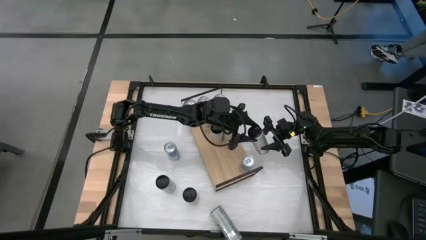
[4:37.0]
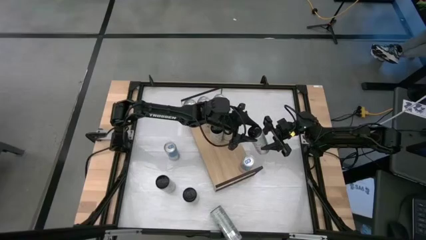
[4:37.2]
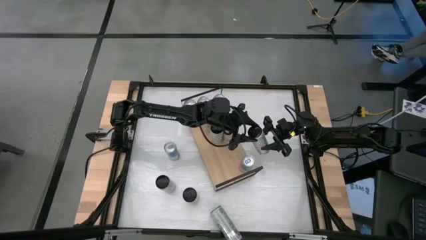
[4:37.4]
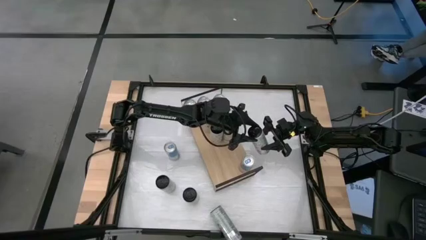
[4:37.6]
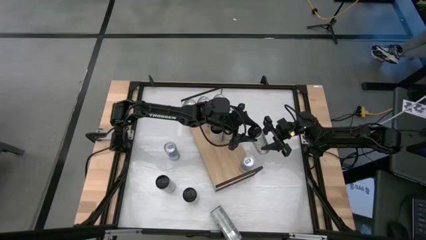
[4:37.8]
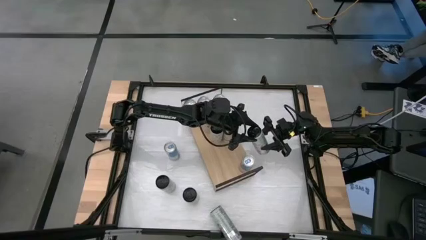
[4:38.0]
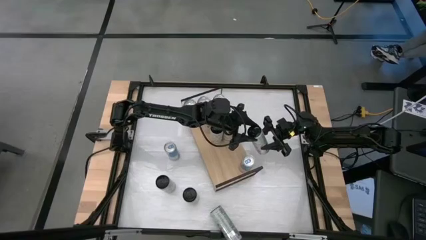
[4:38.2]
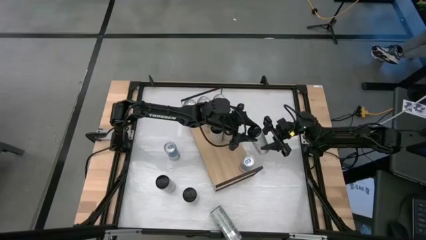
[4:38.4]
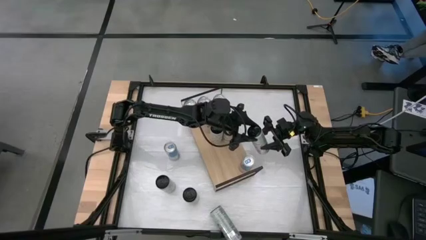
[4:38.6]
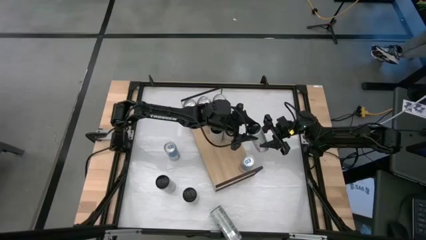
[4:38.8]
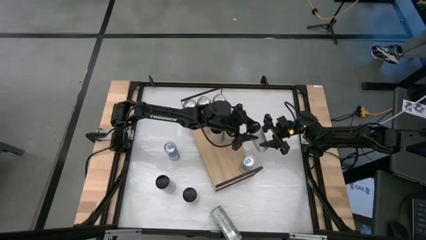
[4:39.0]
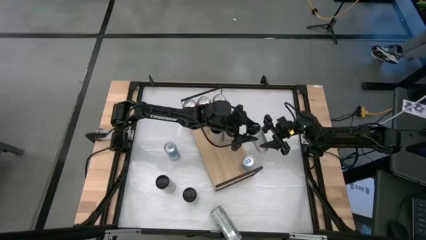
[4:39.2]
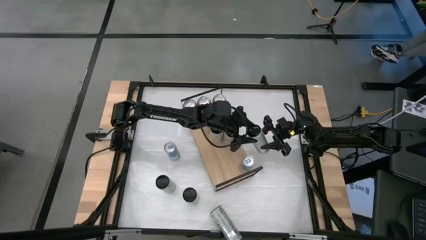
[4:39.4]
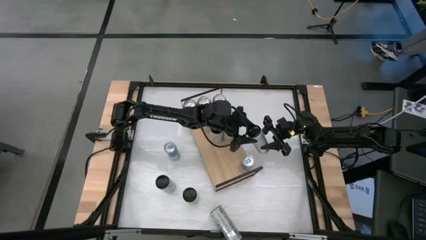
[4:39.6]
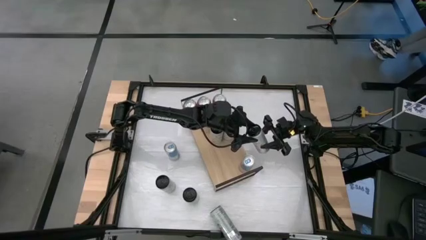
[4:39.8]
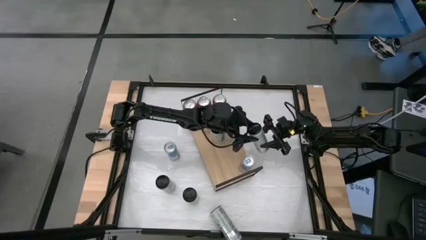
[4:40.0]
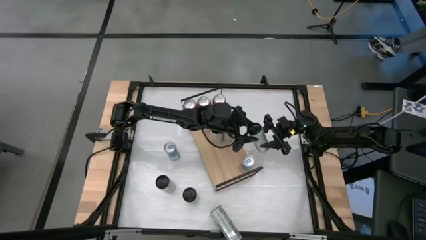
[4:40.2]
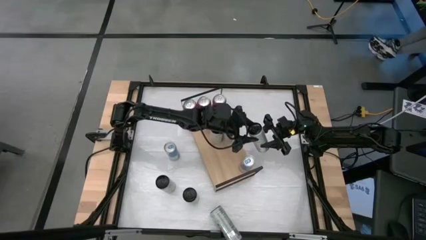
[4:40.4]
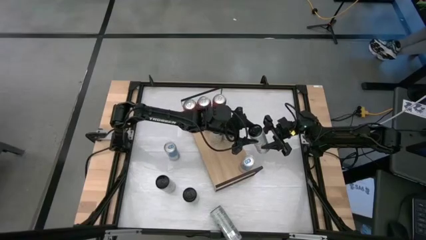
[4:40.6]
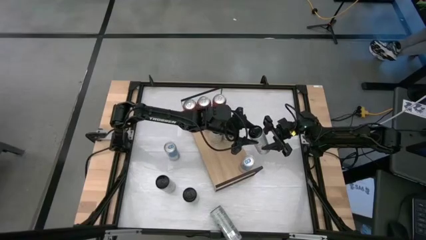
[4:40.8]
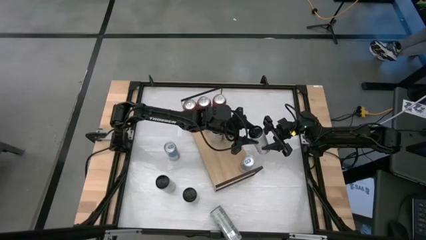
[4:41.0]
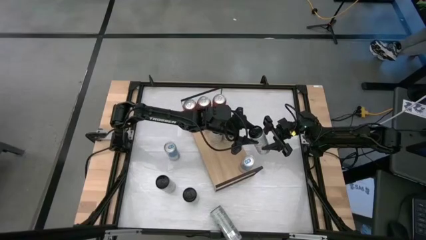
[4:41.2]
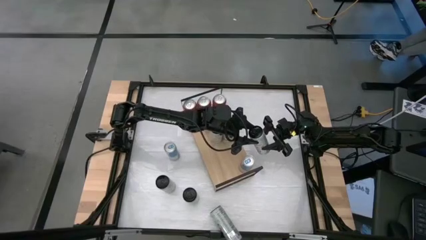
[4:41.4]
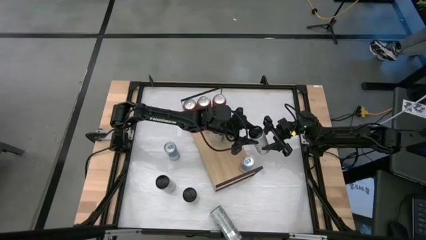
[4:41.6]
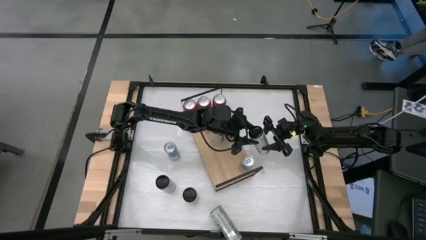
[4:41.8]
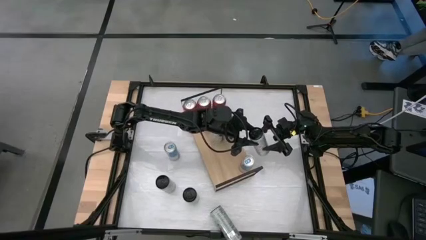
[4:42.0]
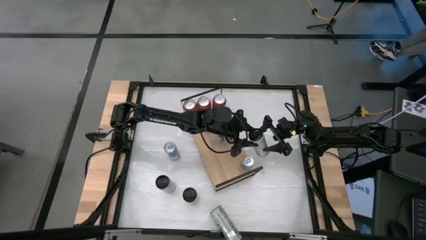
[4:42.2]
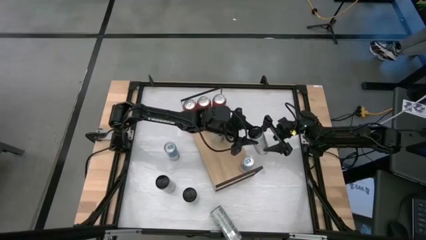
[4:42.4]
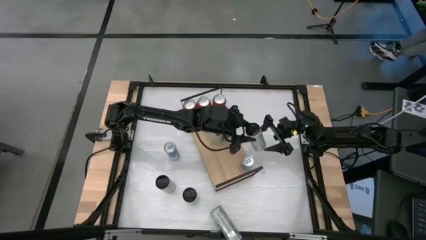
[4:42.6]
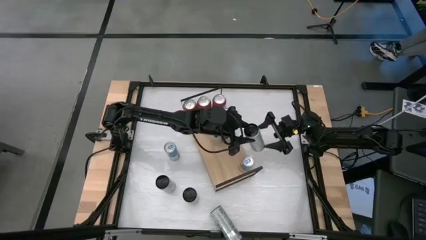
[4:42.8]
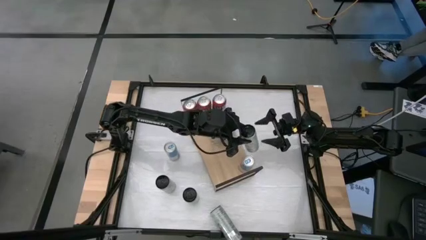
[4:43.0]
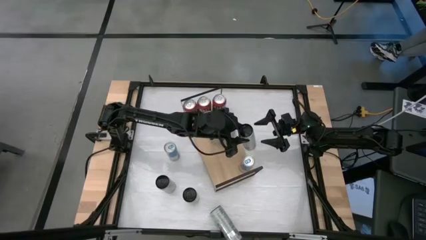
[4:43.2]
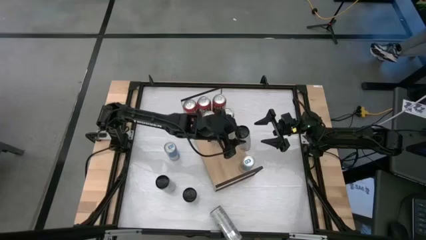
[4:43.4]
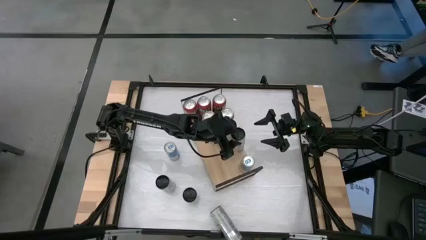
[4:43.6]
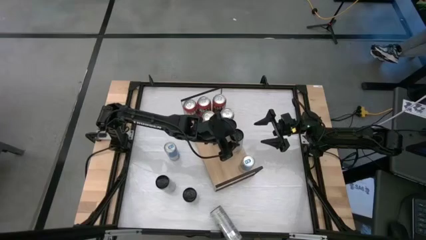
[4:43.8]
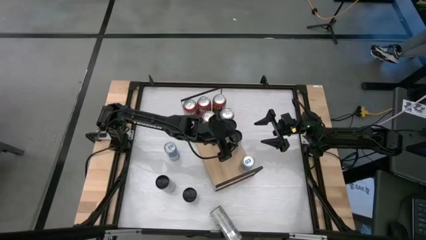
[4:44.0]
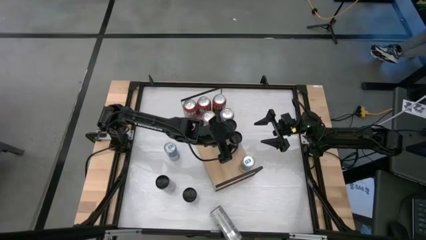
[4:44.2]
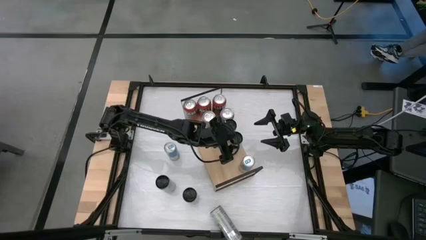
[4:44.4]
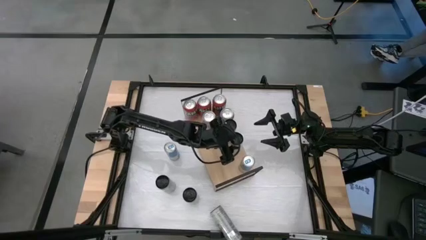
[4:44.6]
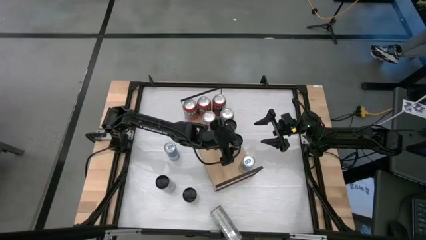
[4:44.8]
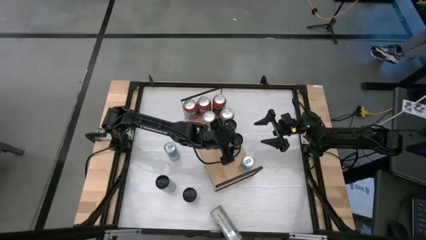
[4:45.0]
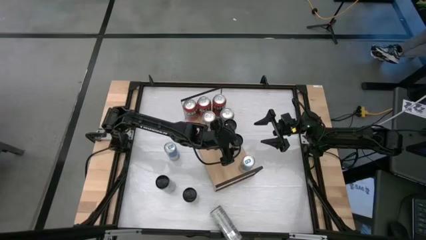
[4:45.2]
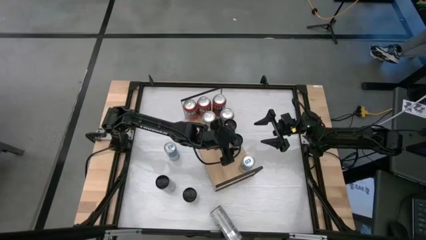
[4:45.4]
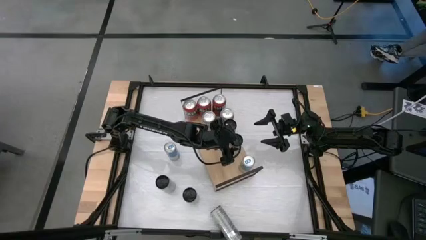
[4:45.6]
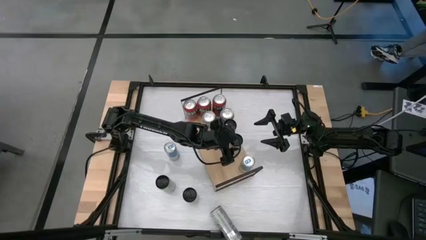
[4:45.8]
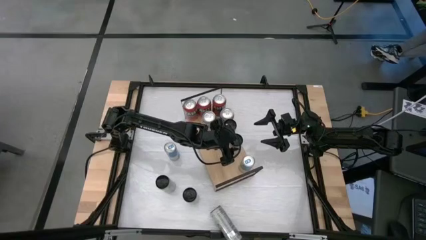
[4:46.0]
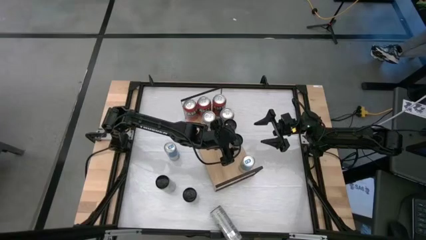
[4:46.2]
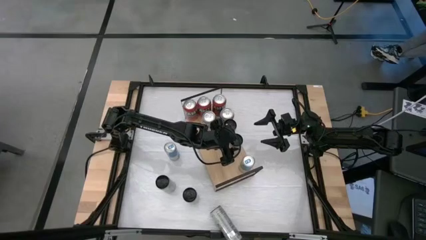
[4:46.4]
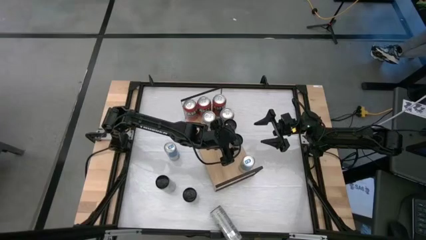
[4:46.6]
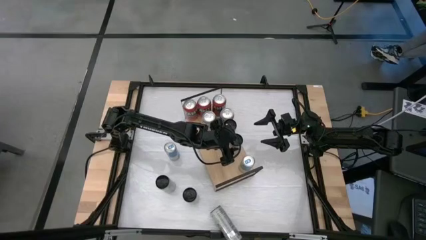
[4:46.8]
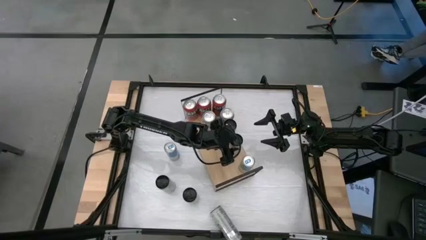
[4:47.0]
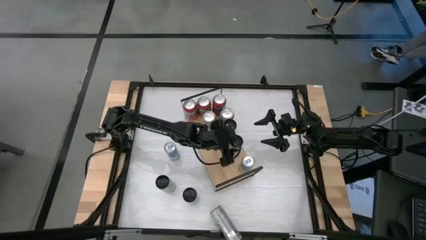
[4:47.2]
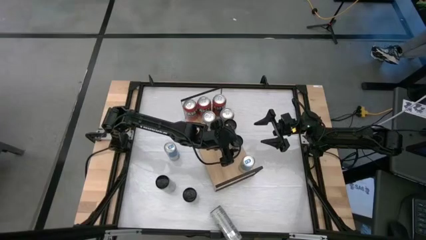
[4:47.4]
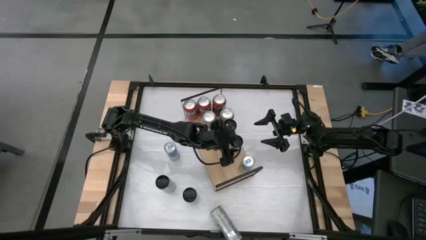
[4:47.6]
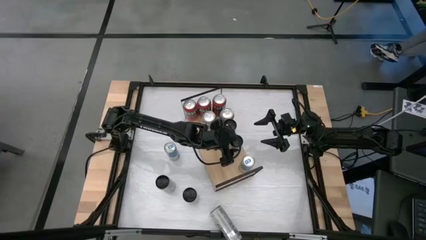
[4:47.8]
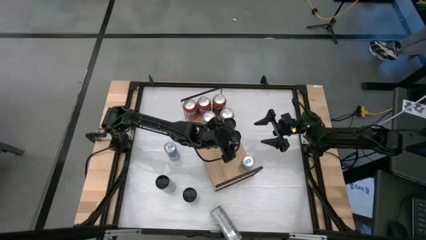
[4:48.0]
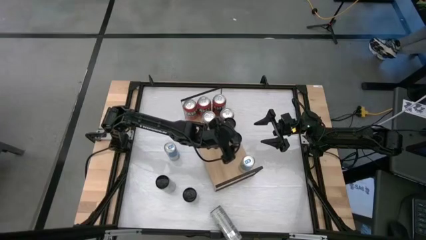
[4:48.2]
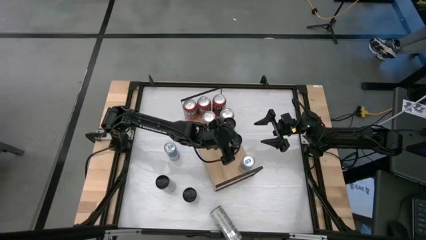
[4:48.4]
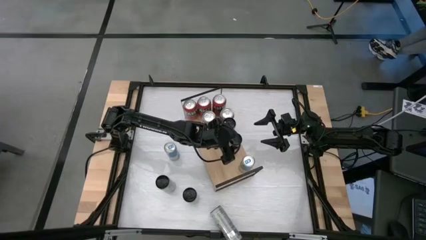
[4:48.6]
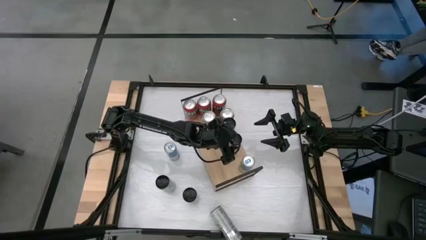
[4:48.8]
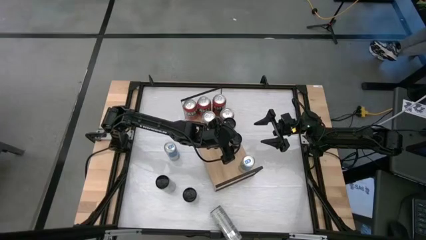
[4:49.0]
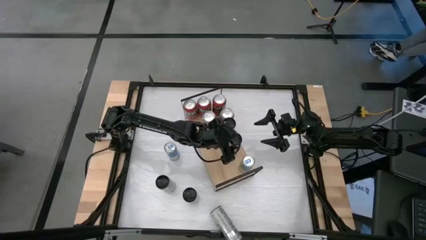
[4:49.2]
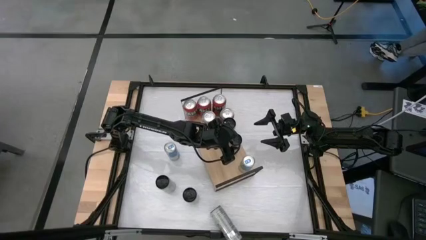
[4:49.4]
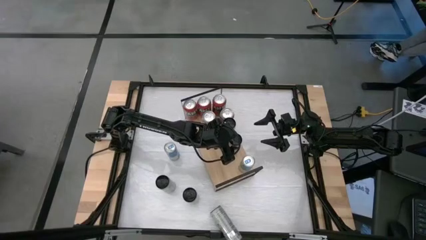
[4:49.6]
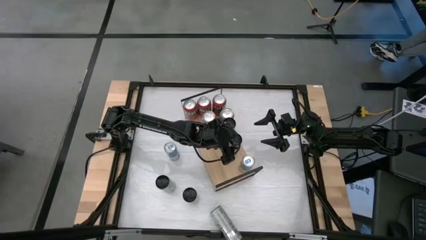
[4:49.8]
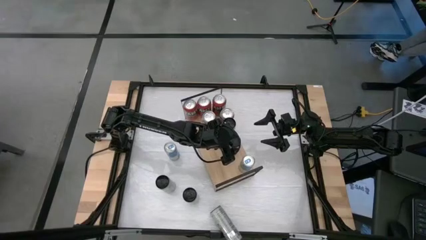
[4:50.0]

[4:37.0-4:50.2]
Task: Place canned beverage on shelf
Put the yellow soda can on the shelf

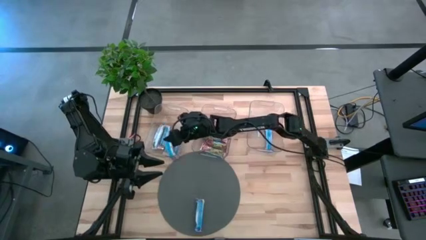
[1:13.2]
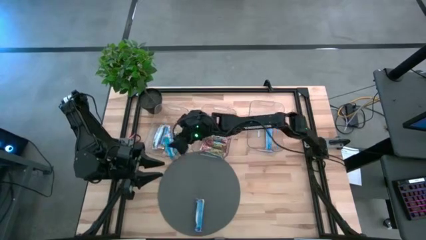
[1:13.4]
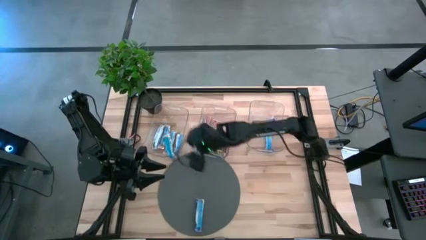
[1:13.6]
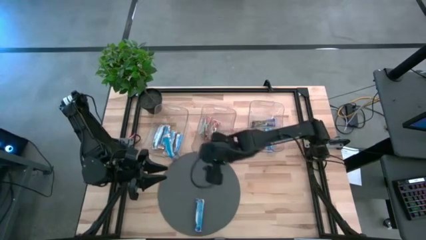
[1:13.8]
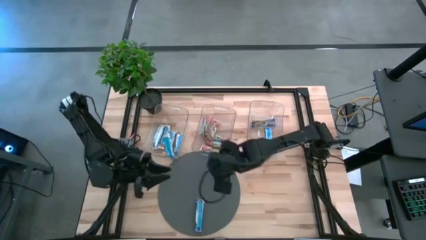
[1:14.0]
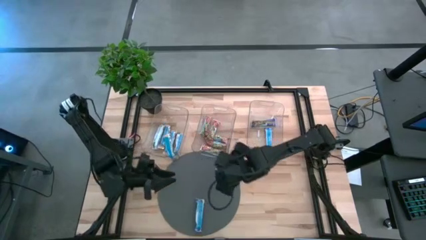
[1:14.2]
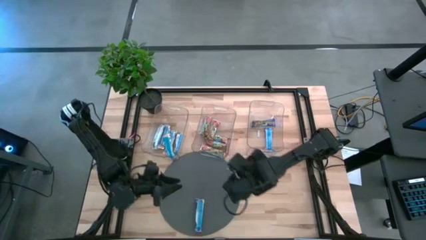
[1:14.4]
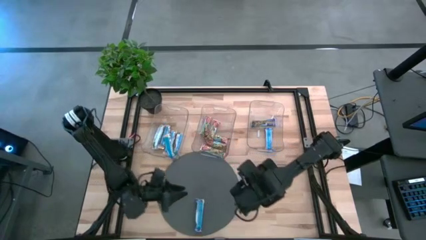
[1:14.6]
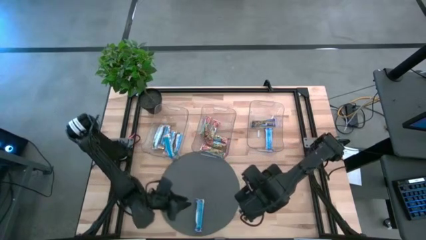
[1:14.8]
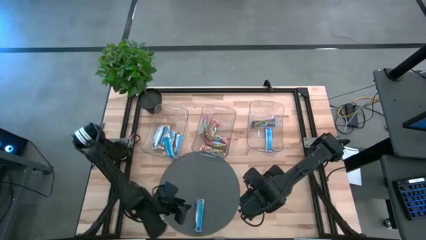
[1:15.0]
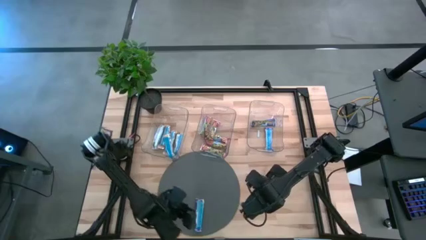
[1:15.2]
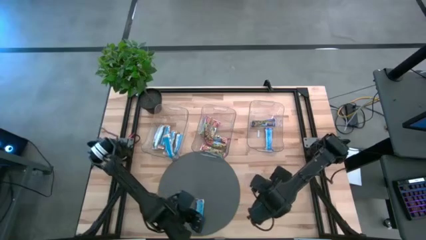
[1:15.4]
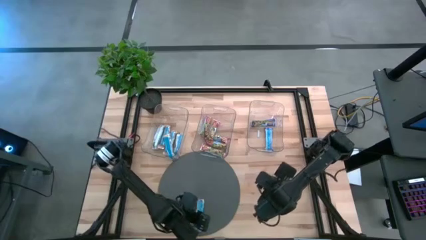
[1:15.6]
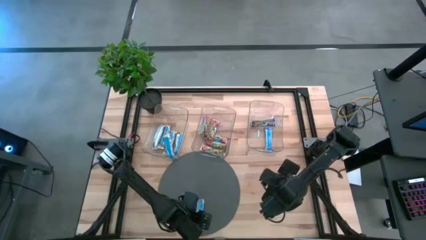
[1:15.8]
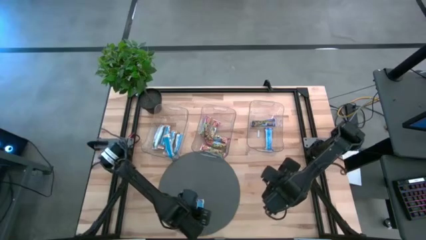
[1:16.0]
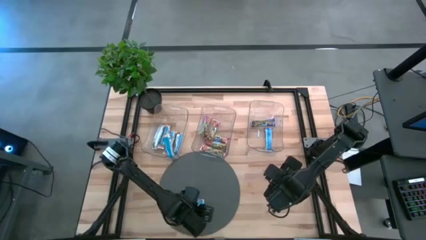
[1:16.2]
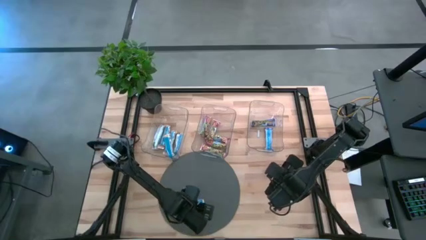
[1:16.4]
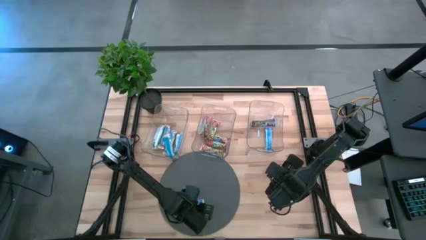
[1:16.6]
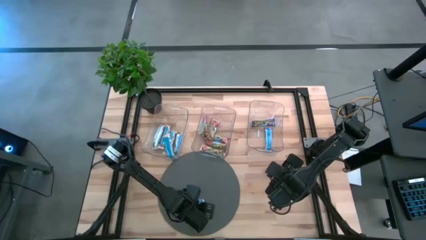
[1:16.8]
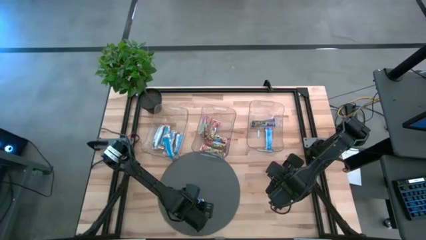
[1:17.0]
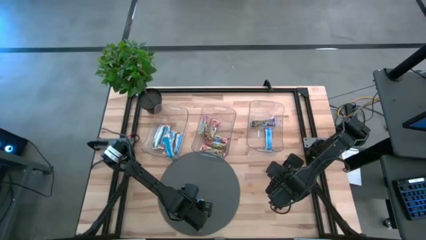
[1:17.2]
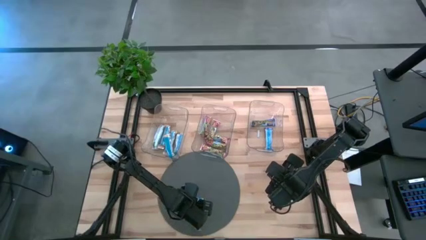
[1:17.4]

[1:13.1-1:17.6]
Task: Pick and place Granola Bars by type
Put the blue granola bar into the right transparent bin
